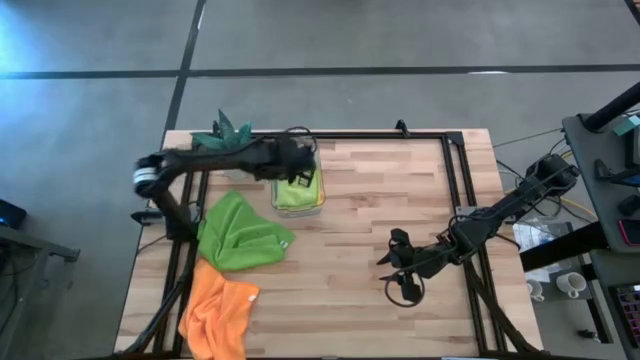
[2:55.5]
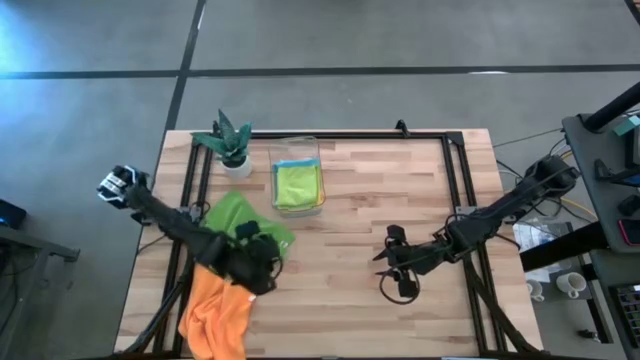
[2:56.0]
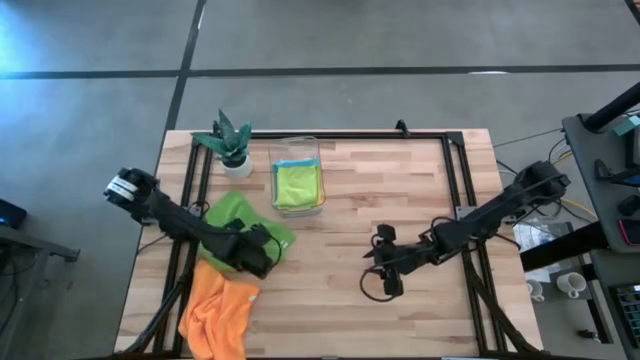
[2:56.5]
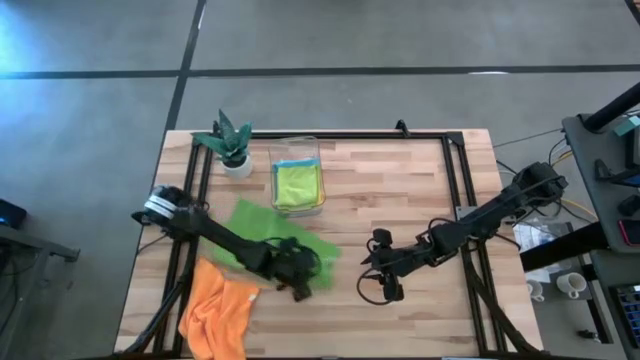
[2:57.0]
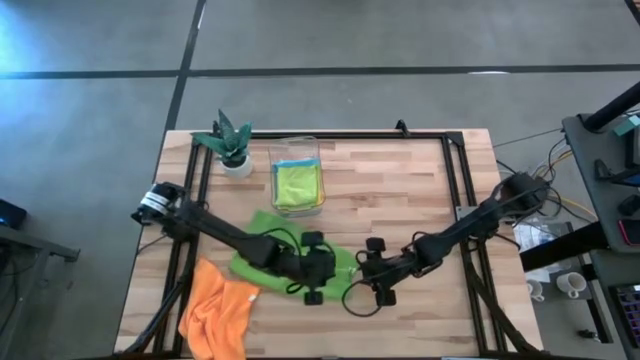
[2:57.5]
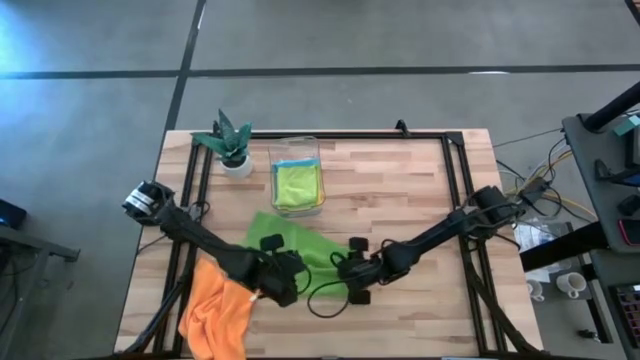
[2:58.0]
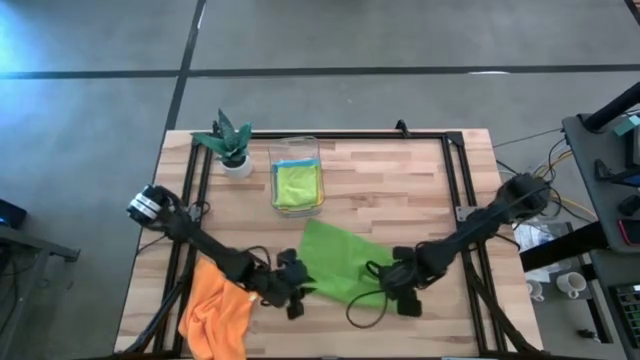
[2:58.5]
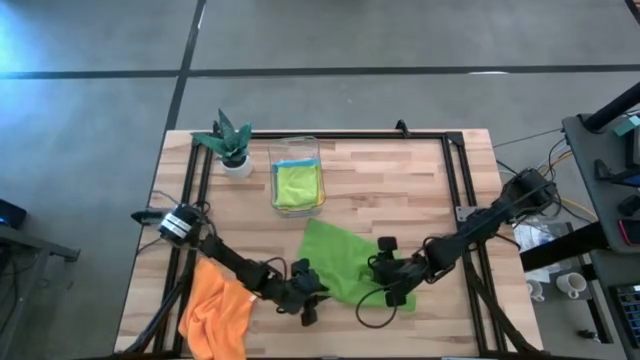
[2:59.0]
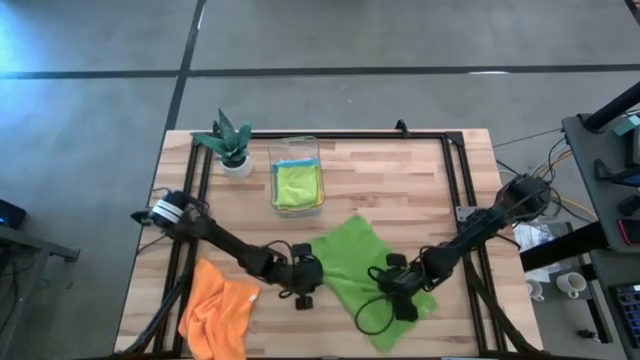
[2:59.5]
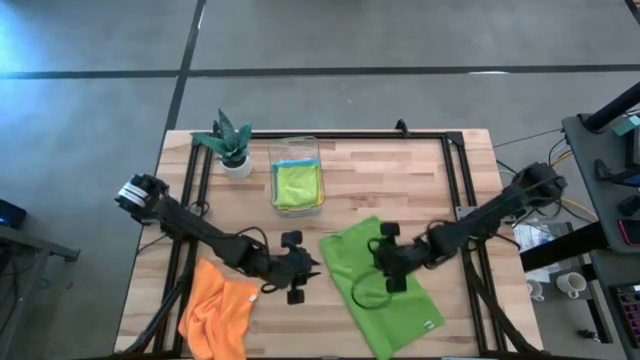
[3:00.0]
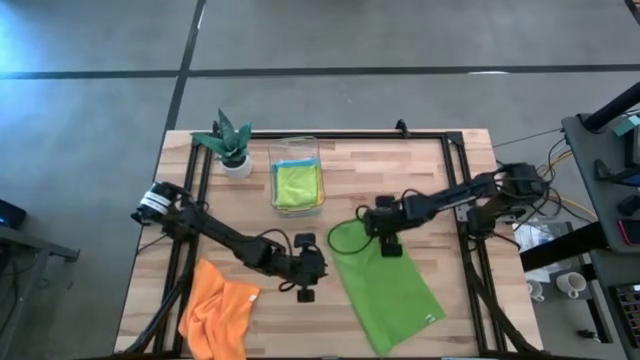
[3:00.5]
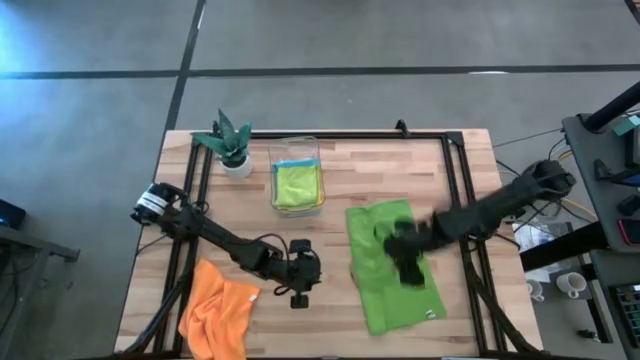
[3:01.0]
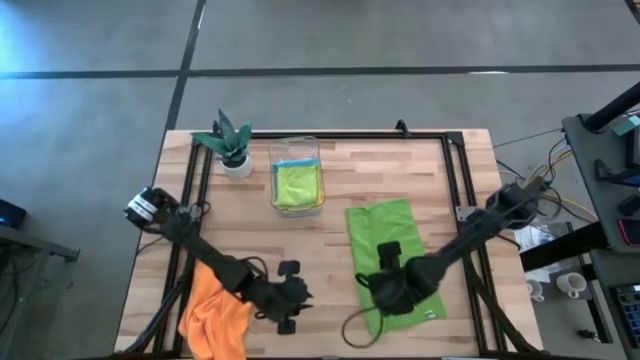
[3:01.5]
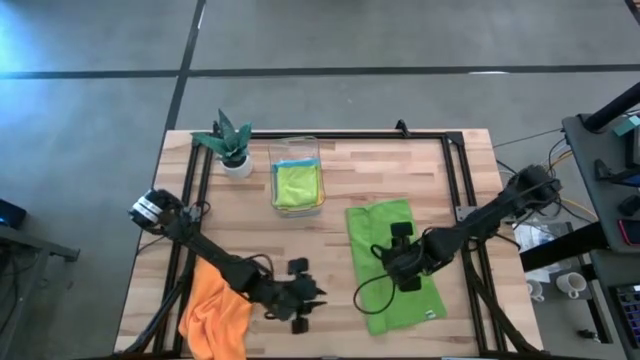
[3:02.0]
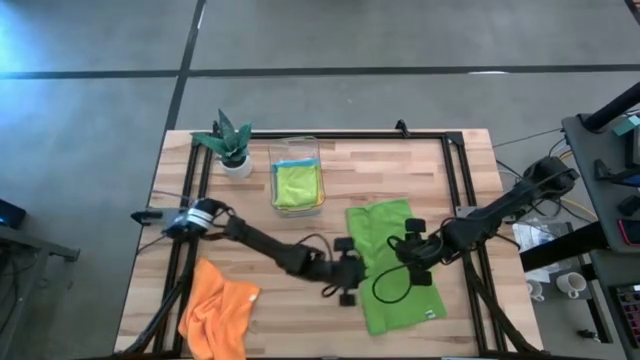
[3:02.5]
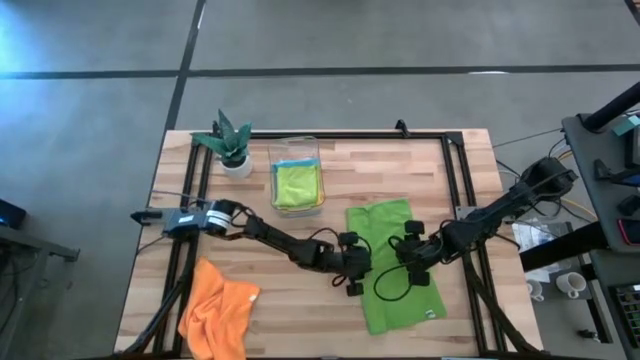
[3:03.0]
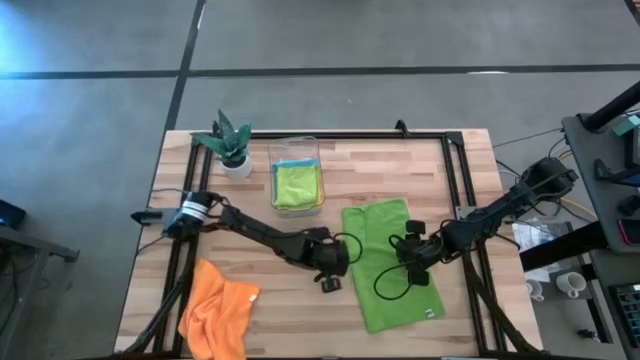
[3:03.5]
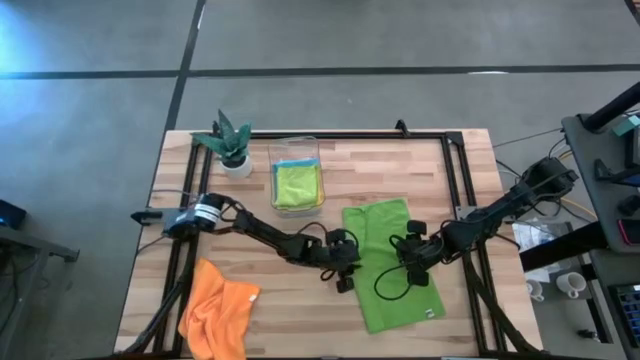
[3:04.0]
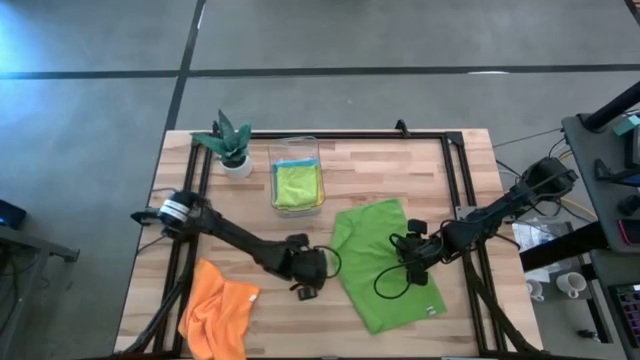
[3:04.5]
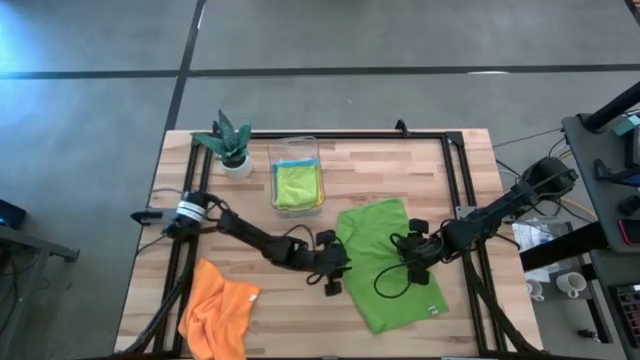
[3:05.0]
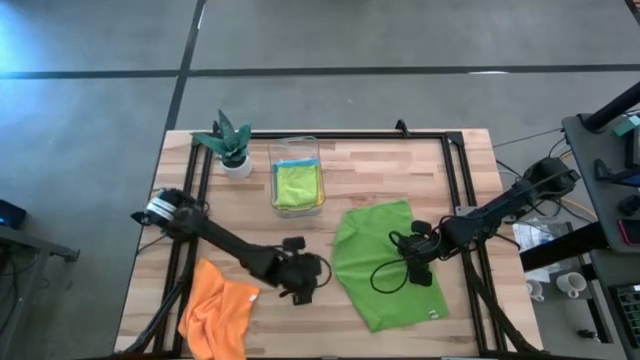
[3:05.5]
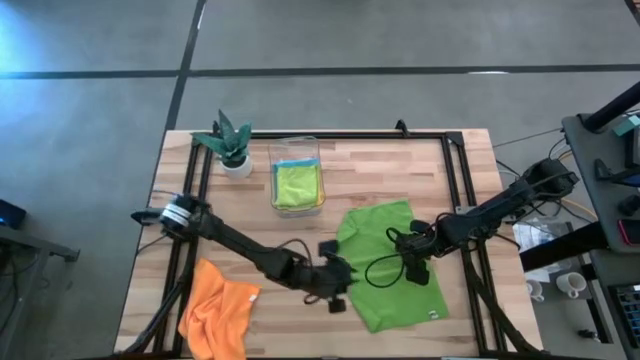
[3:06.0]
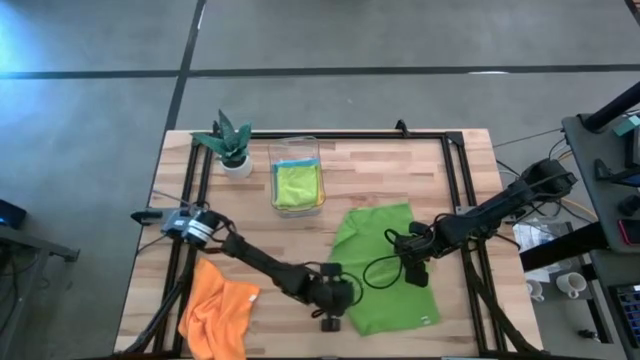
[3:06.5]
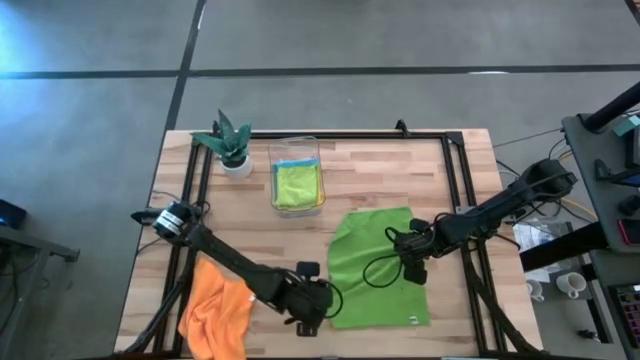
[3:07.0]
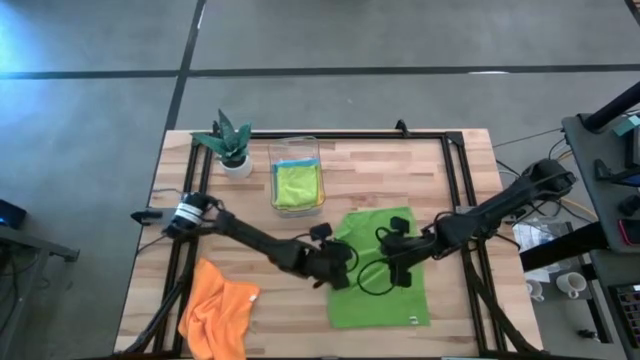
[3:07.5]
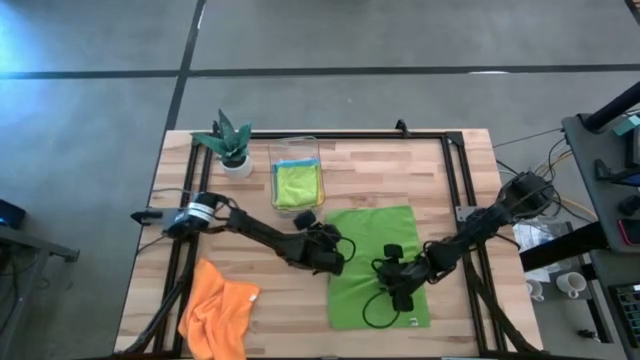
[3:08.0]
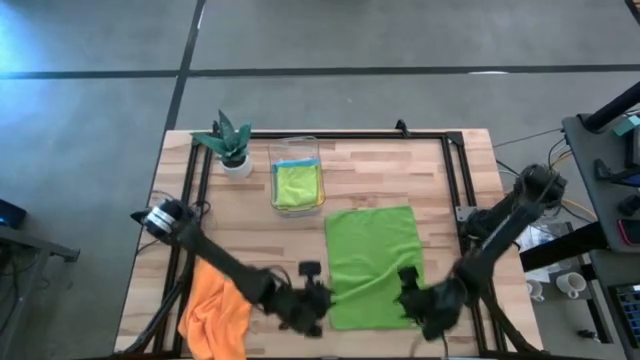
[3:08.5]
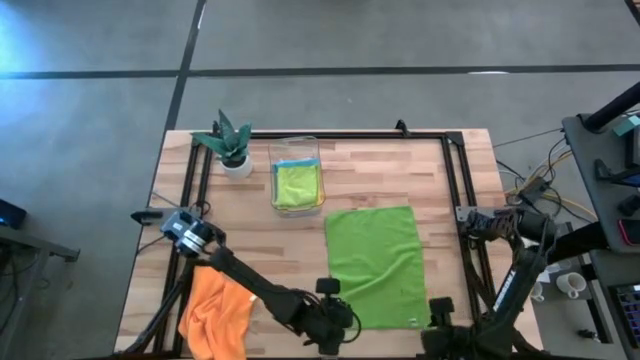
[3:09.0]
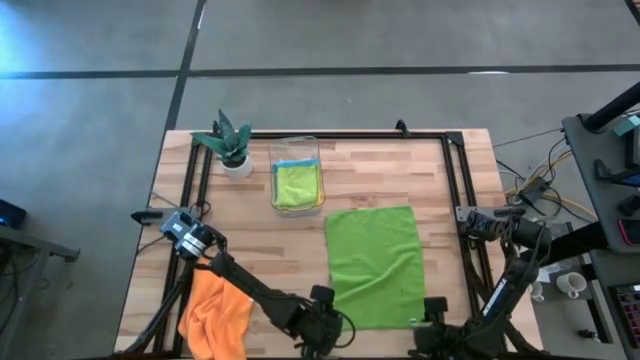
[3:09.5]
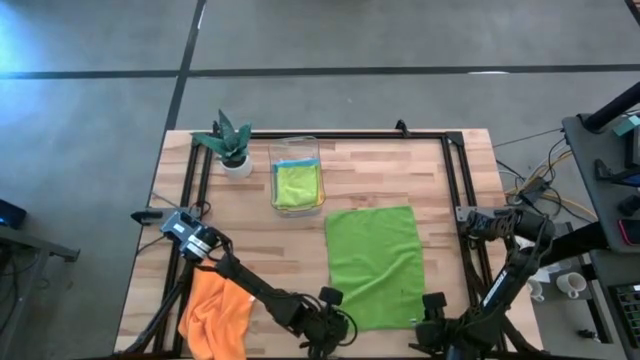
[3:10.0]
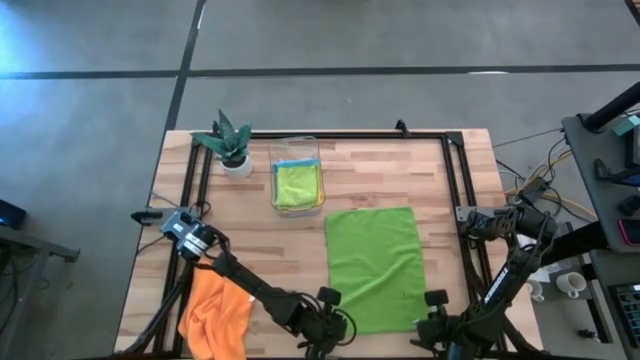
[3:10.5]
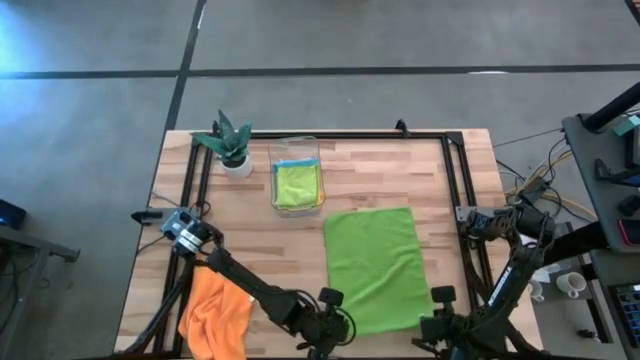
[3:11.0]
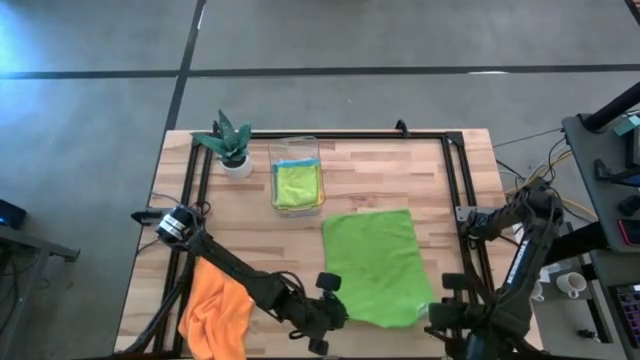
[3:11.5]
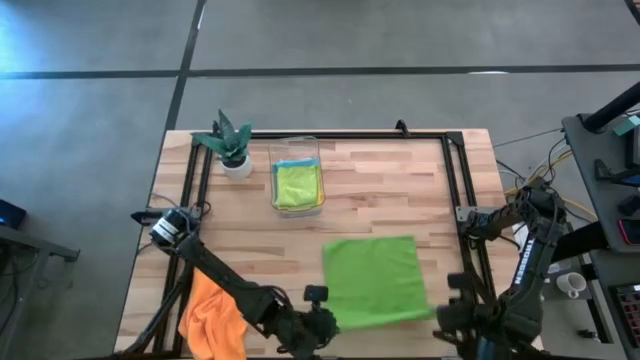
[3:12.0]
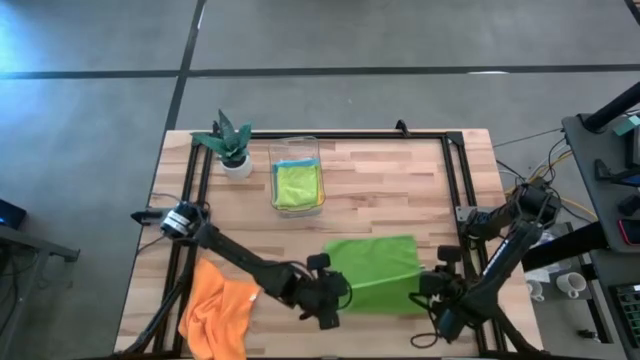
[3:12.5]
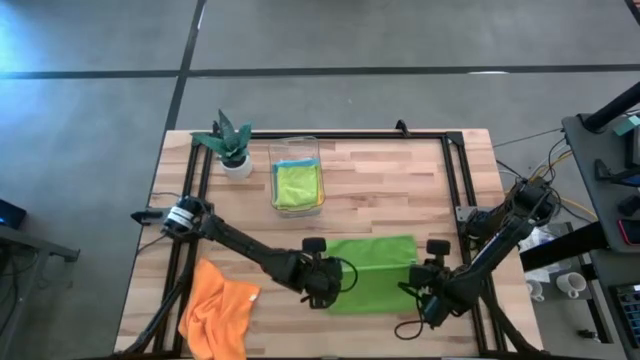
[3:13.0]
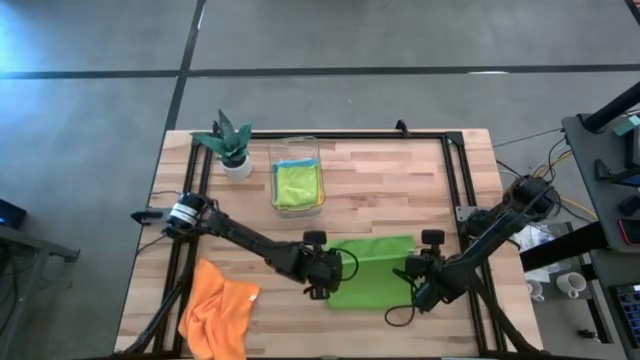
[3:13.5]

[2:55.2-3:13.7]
Task: Fold microfiber towels
Fold the green microfiber cloth
